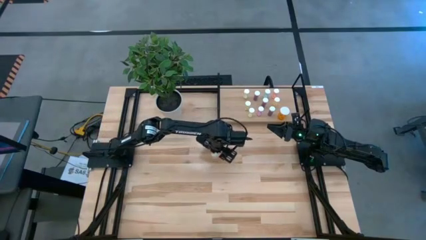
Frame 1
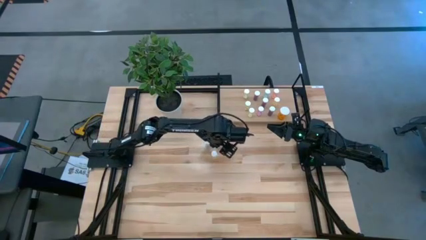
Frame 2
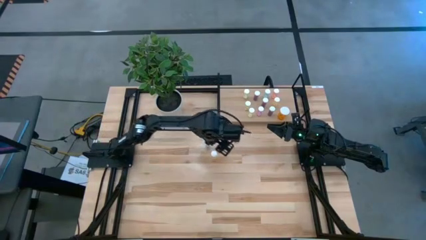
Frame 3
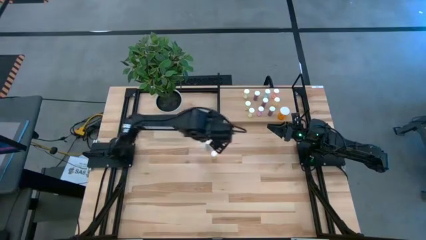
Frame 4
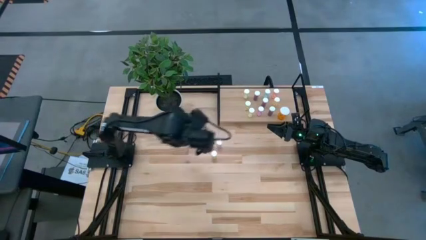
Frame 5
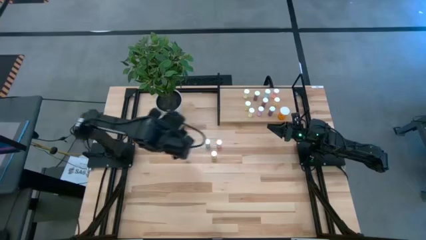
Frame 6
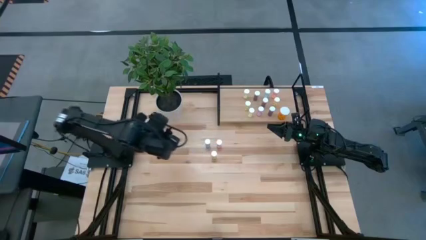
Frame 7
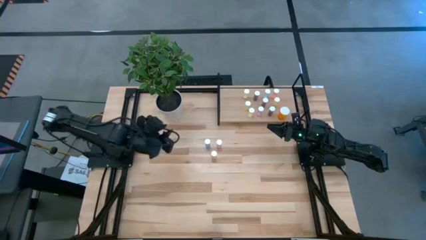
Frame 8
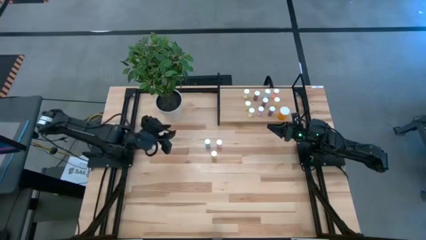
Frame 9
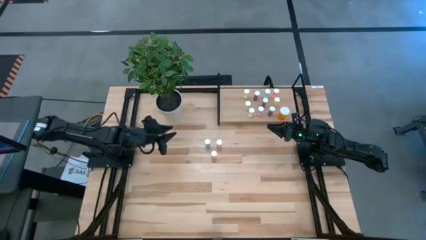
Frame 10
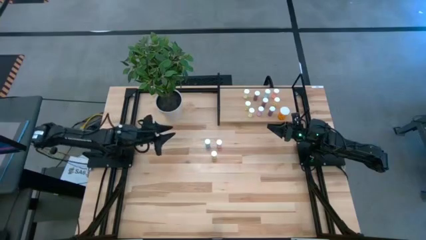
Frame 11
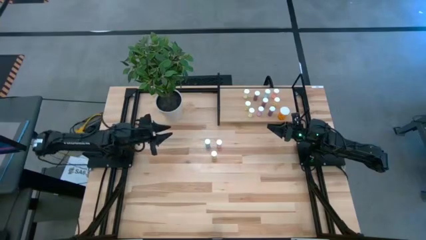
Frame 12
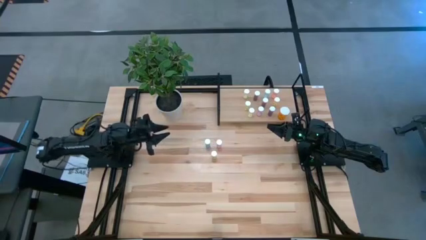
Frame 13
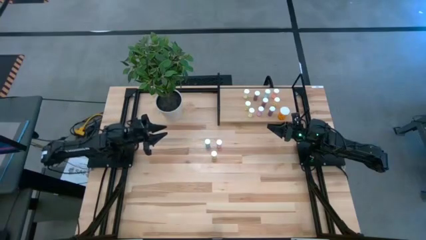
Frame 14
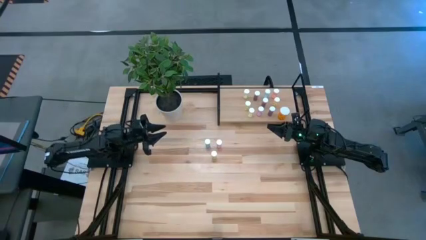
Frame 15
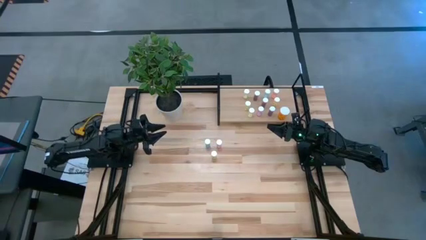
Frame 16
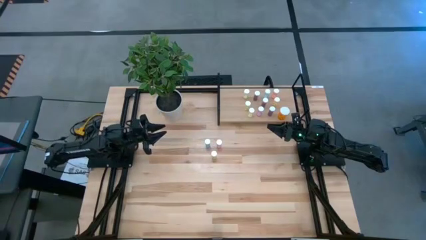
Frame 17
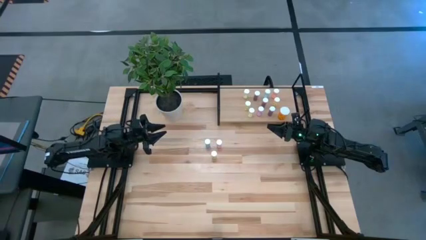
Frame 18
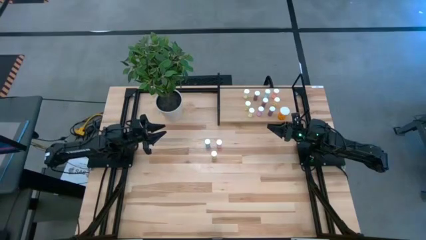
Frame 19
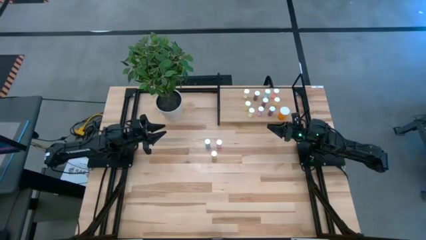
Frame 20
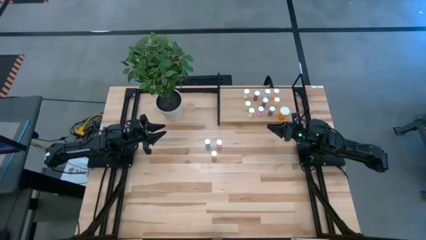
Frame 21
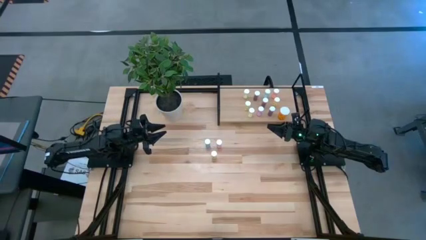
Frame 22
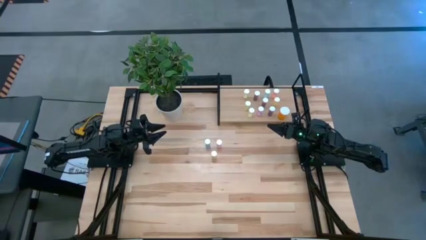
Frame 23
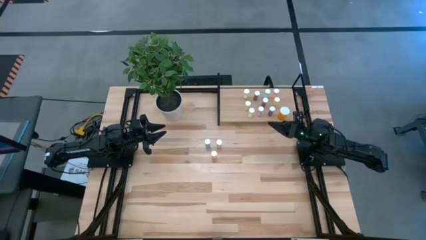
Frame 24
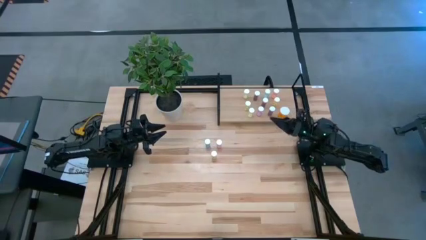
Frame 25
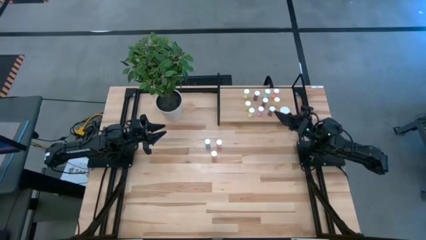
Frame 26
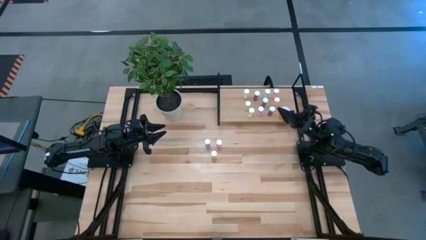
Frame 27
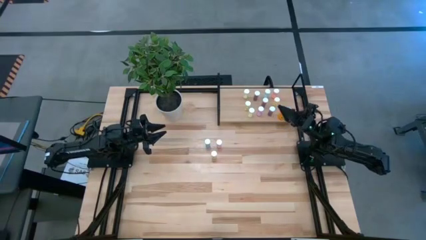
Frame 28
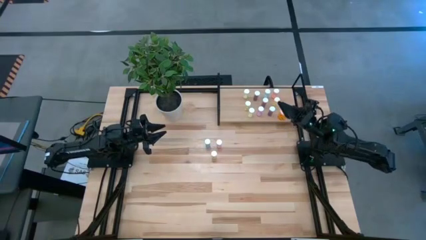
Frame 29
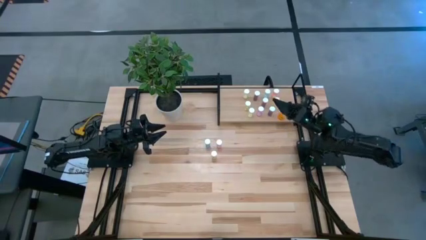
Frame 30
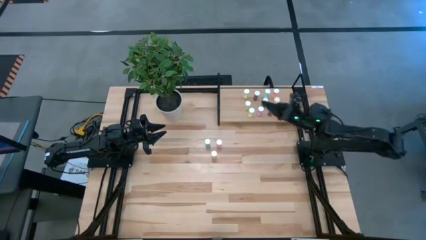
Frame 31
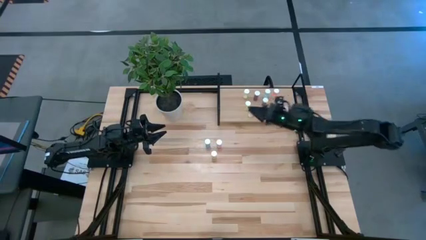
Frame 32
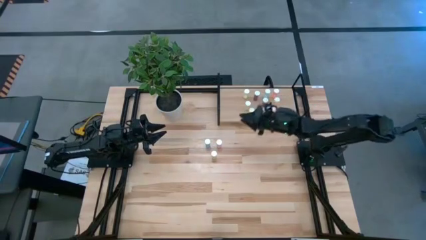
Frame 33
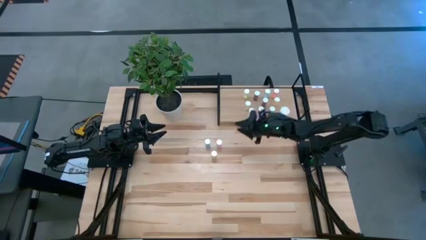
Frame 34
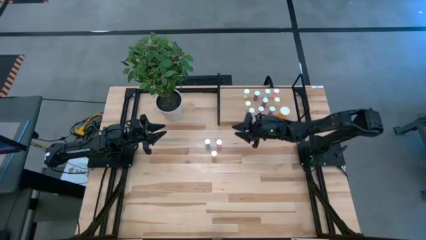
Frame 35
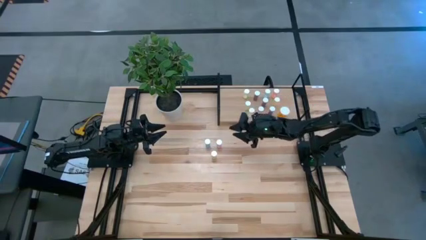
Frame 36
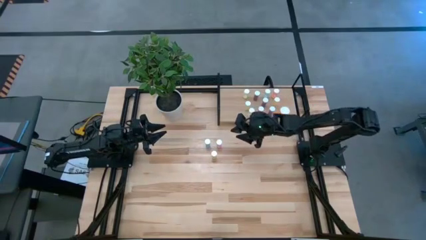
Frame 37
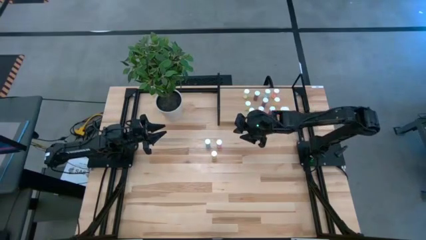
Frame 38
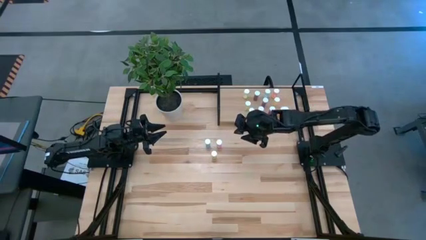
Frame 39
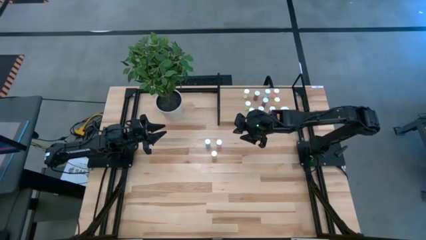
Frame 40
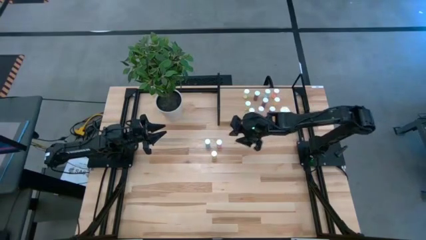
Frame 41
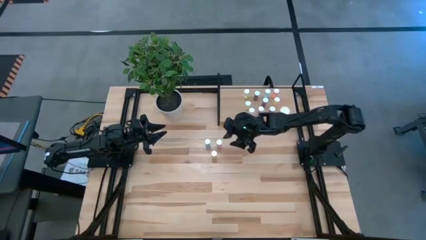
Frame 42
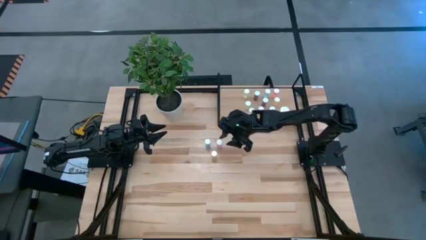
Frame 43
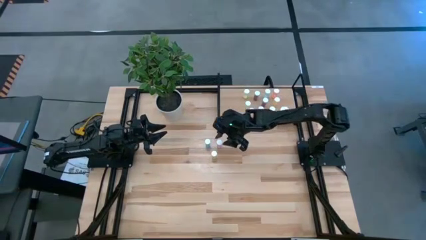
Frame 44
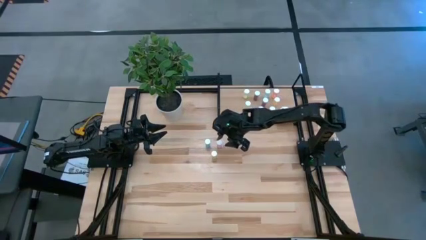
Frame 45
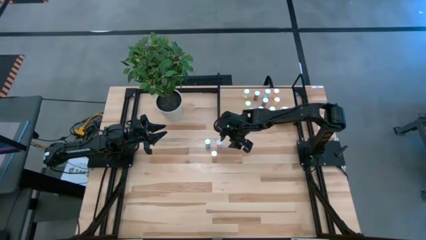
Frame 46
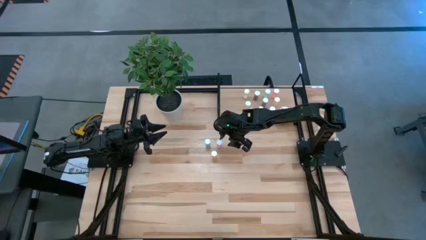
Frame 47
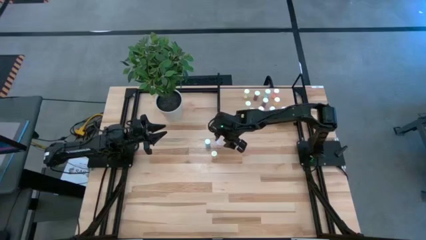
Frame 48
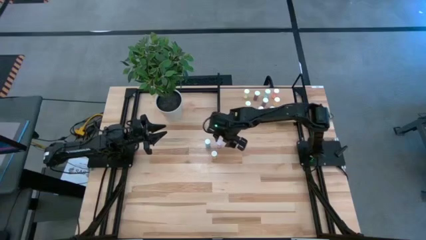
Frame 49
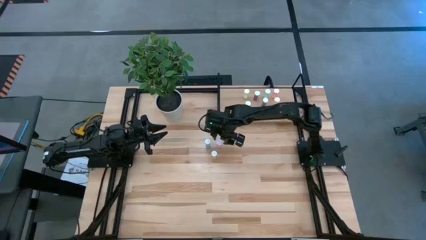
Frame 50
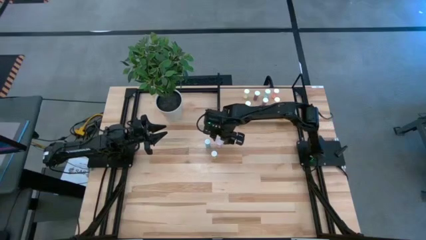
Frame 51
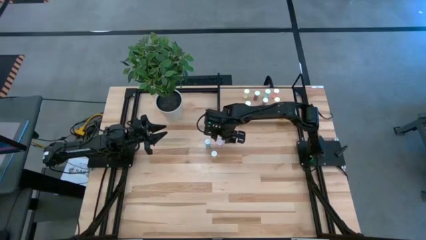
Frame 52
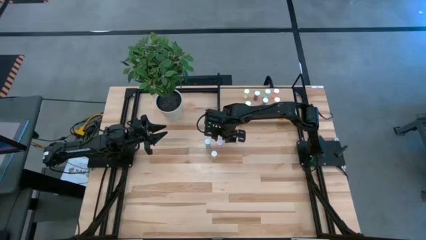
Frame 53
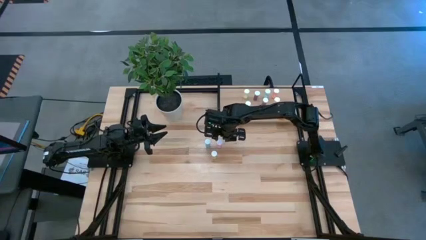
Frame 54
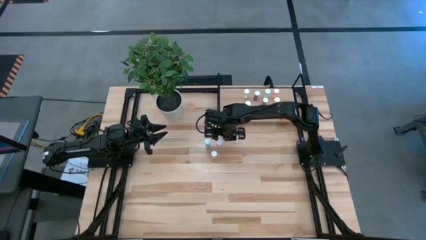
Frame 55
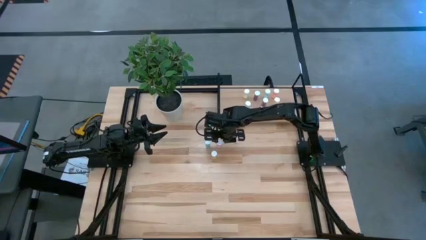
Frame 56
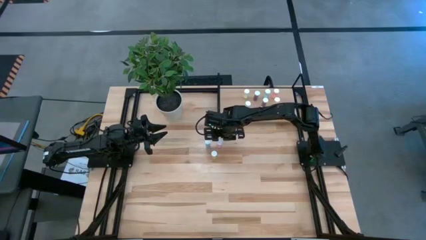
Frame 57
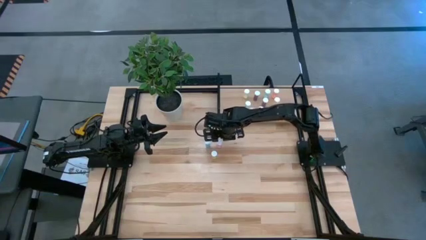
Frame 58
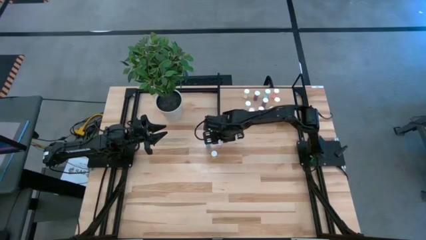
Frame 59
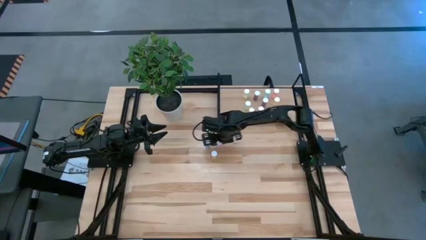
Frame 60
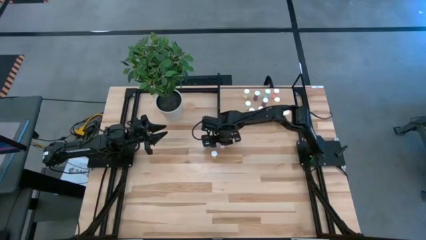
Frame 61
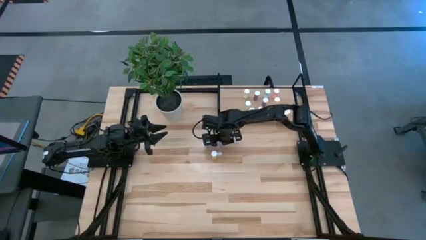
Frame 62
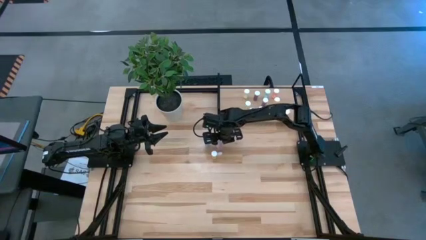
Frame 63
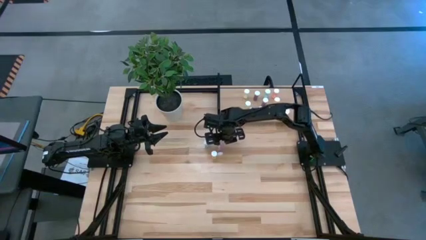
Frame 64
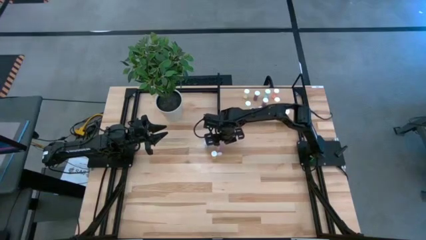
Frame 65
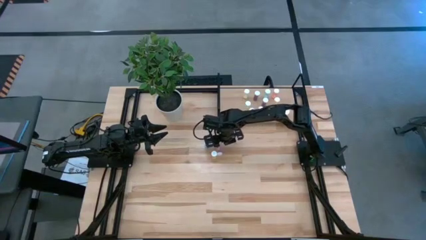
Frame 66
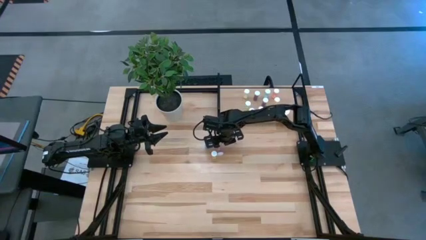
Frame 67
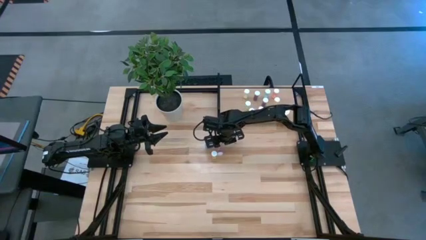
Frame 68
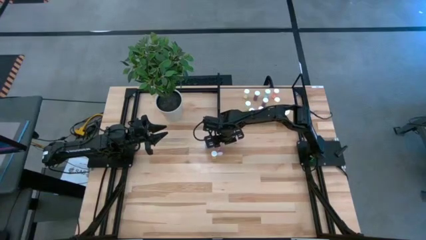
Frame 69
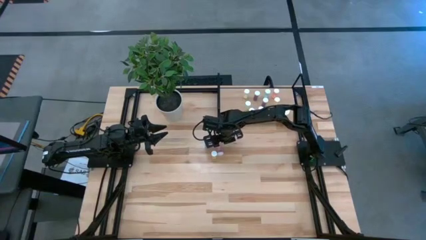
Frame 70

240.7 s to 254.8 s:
Task: Pick and place medicine bottles onto shelf by color
Put the pink pill bottle on the shelf

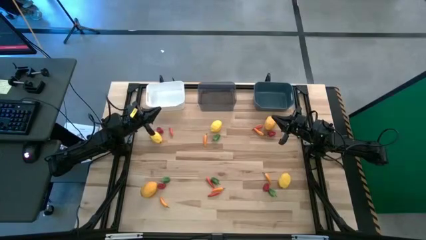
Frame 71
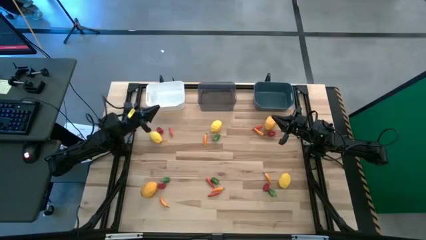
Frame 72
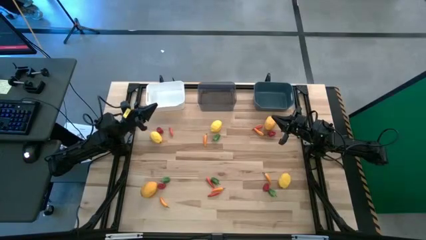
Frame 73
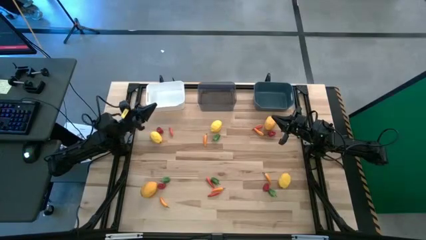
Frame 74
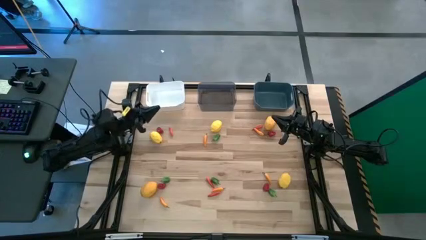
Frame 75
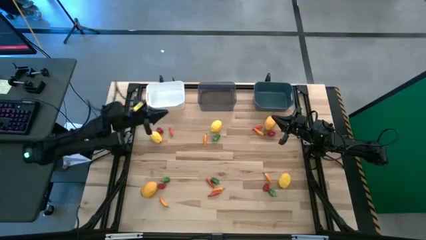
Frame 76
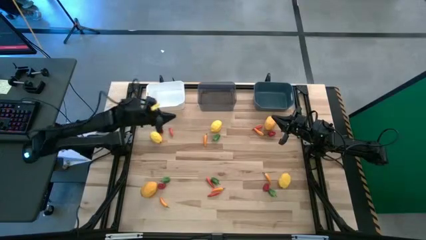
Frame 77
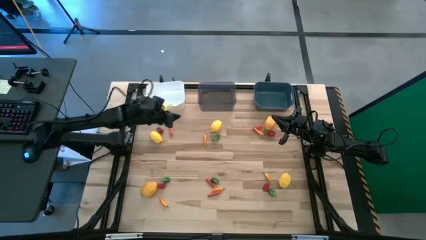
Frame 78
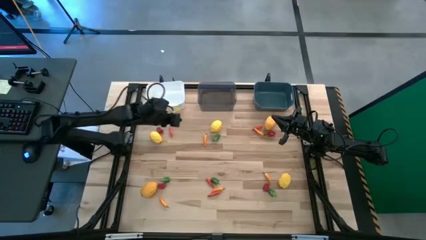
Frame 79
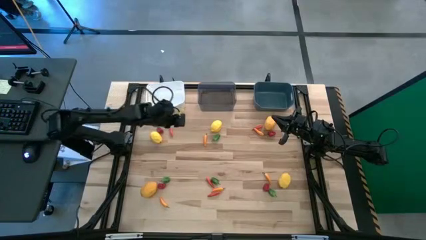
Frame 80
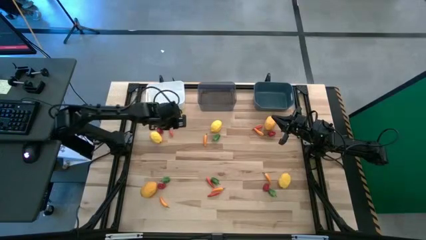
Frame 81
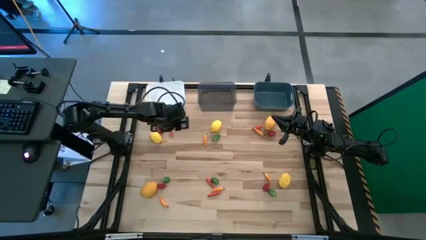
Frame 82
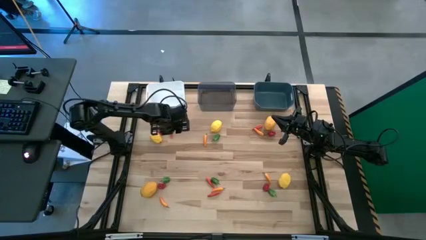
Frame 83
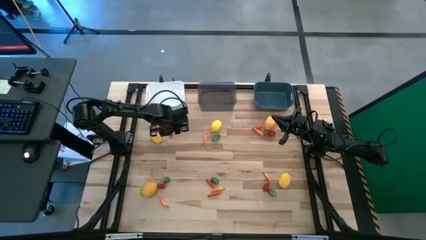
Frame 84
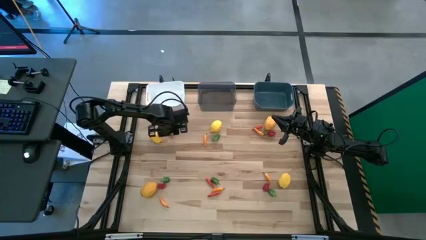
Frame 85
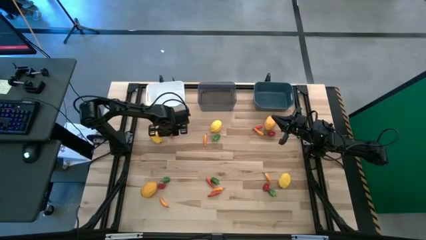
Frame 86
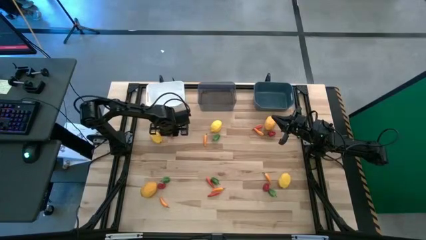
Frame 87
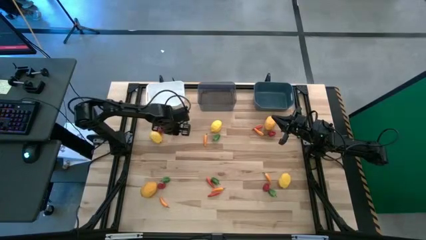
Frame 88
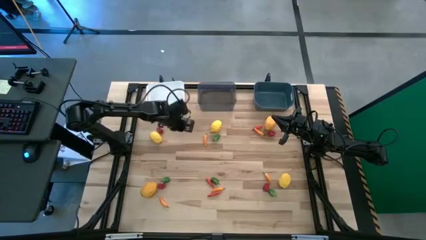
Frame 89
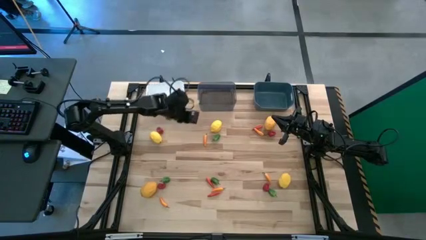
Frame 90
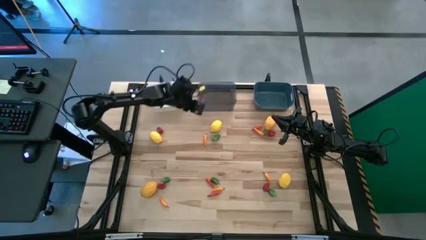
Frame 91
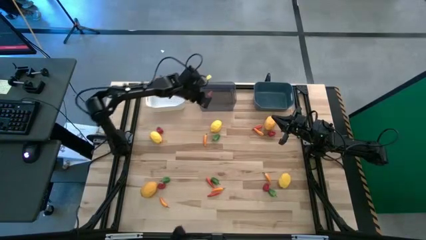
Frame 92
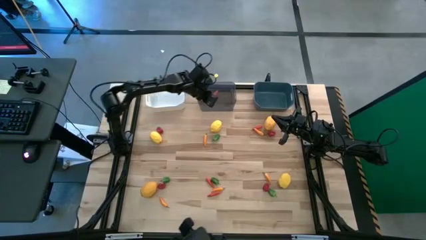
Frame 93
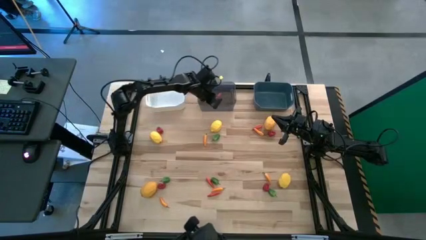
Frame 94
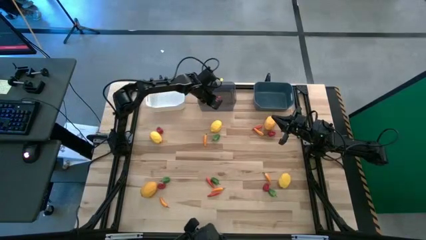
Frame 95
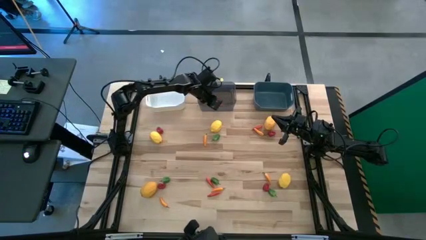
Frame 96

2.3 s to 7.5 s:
Task: Sort produce into baskets
Put the top left orange chili pepper into the black bin
